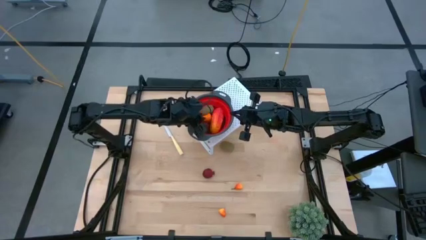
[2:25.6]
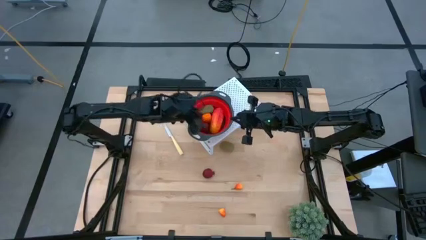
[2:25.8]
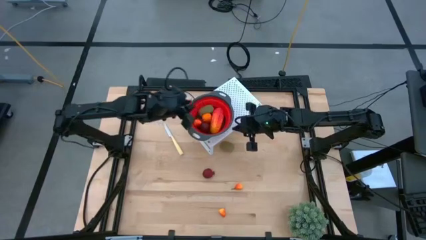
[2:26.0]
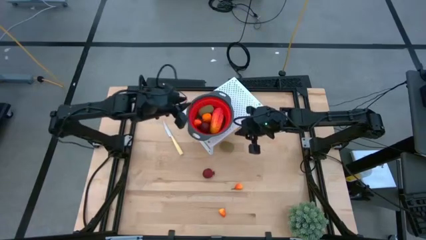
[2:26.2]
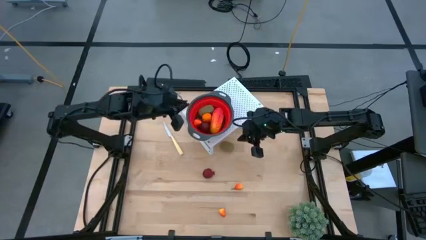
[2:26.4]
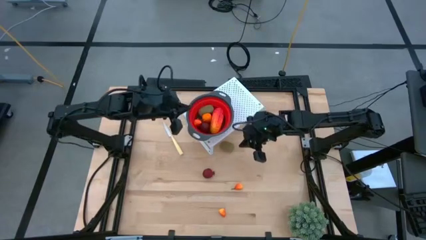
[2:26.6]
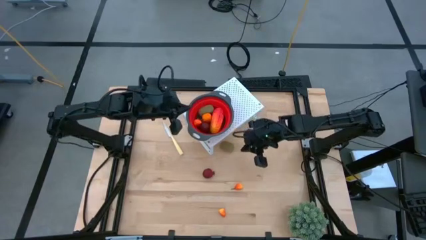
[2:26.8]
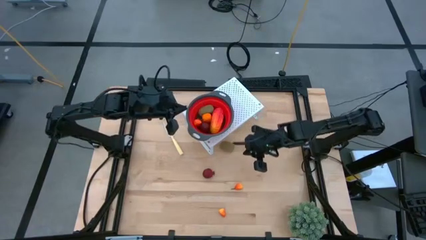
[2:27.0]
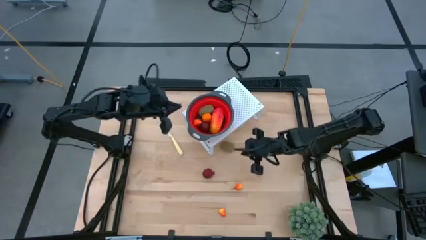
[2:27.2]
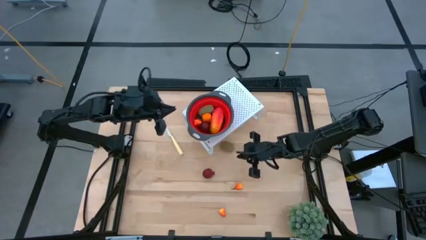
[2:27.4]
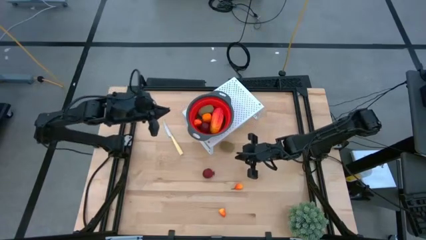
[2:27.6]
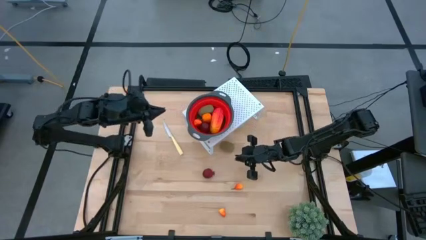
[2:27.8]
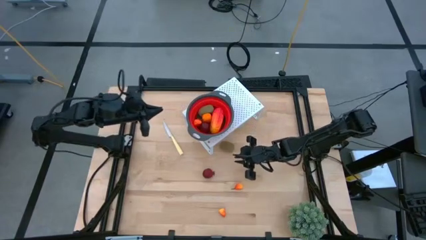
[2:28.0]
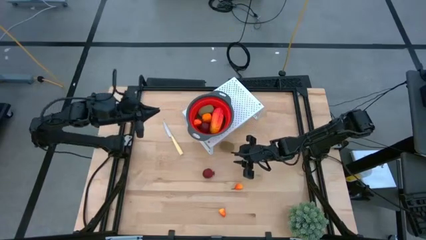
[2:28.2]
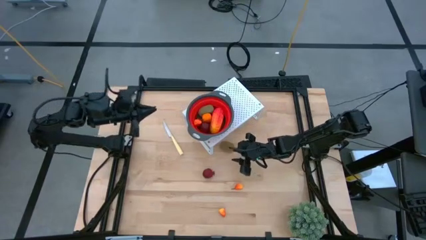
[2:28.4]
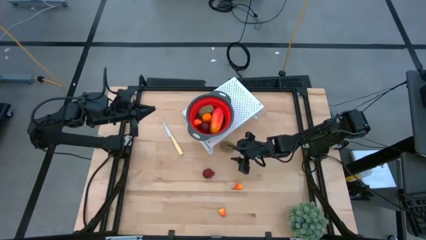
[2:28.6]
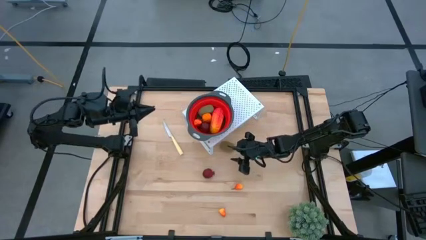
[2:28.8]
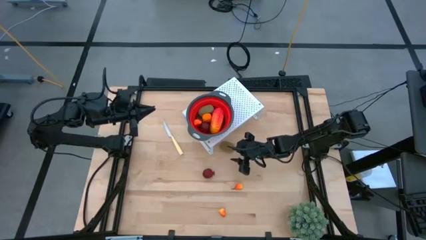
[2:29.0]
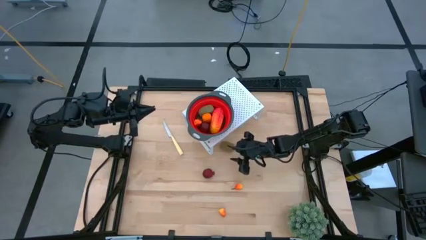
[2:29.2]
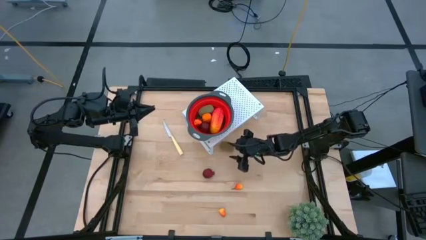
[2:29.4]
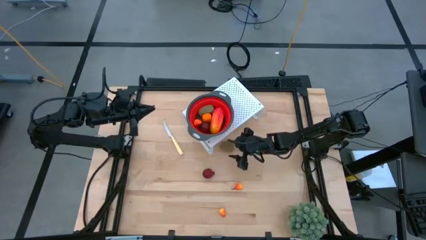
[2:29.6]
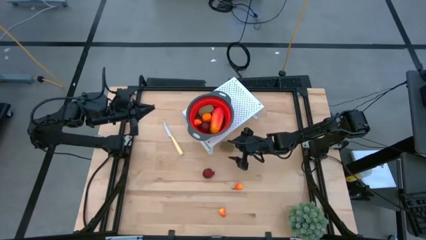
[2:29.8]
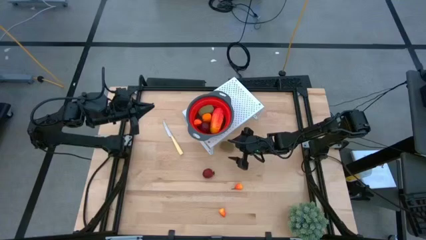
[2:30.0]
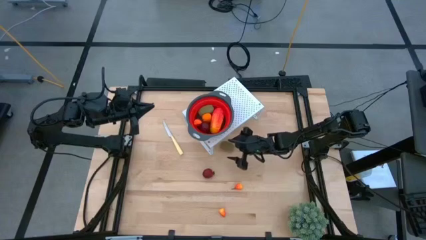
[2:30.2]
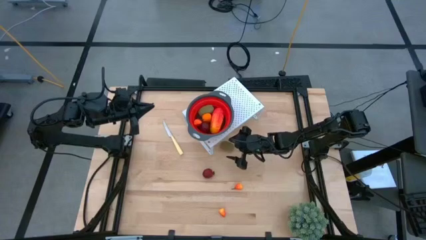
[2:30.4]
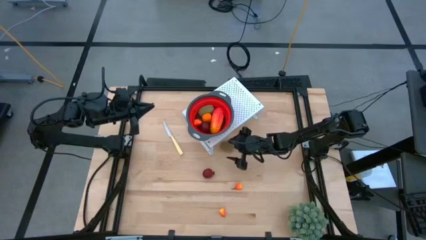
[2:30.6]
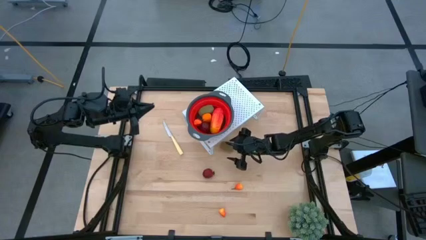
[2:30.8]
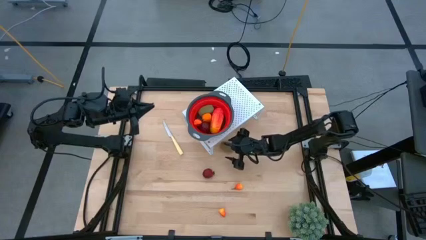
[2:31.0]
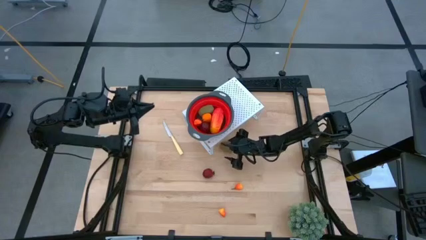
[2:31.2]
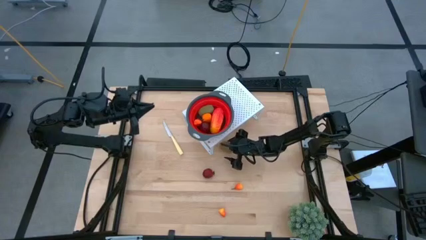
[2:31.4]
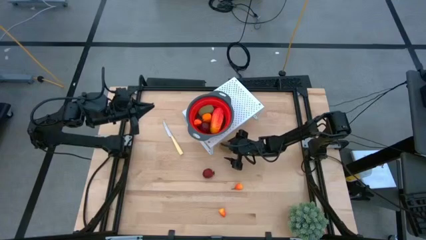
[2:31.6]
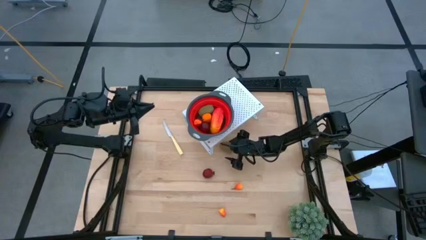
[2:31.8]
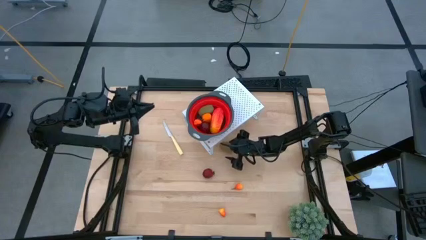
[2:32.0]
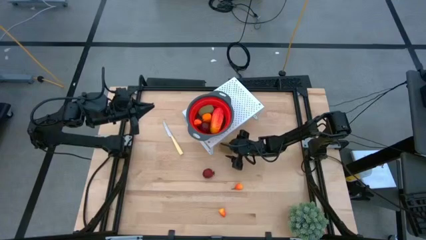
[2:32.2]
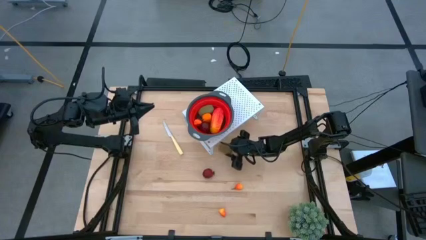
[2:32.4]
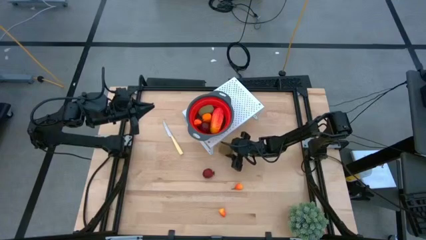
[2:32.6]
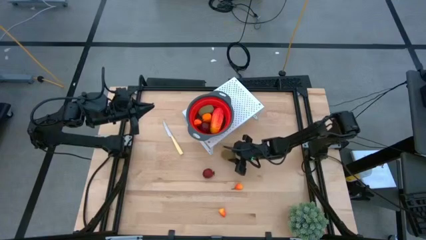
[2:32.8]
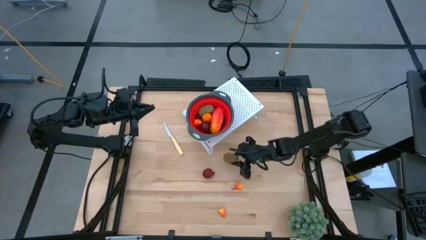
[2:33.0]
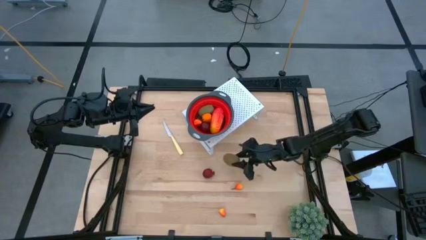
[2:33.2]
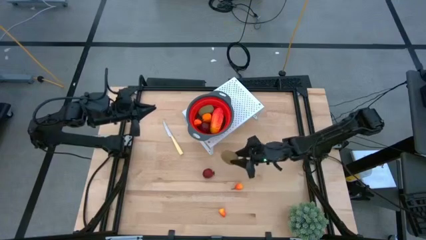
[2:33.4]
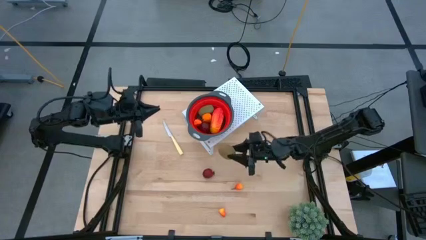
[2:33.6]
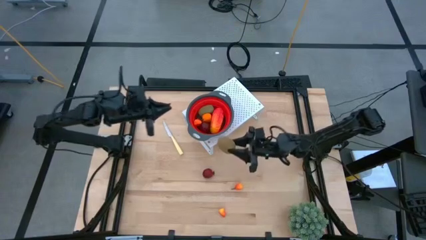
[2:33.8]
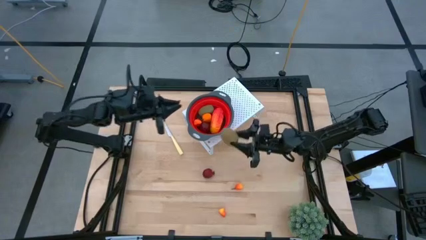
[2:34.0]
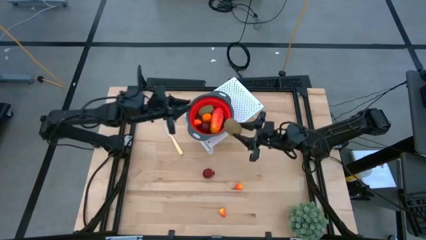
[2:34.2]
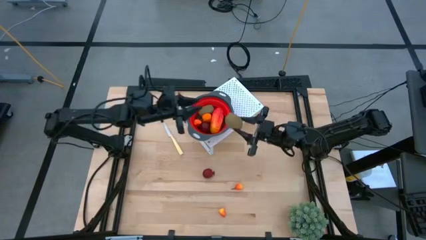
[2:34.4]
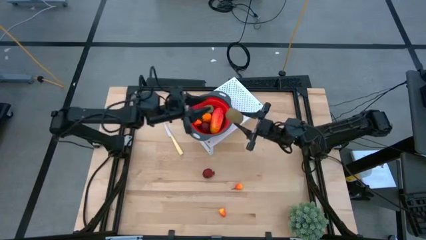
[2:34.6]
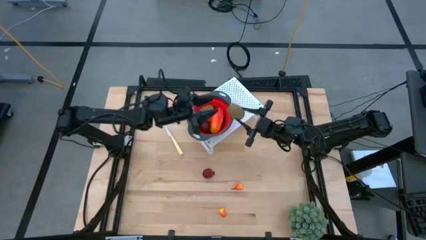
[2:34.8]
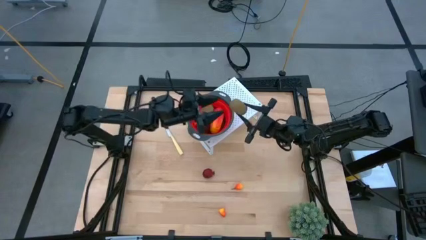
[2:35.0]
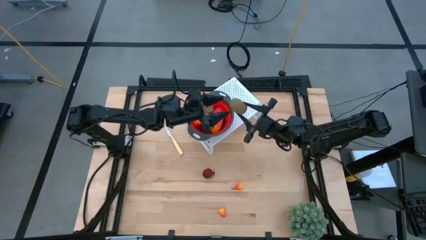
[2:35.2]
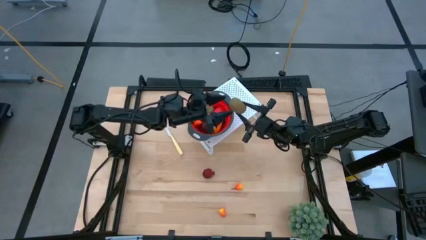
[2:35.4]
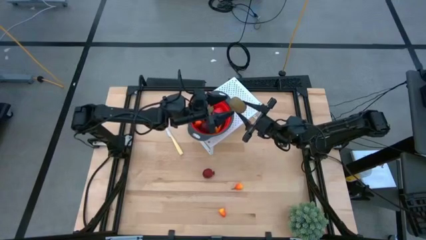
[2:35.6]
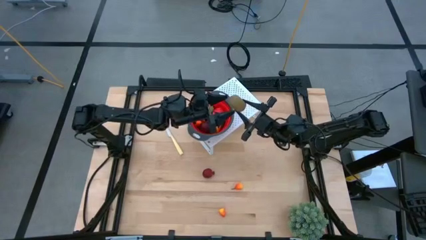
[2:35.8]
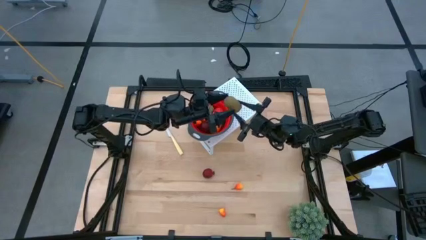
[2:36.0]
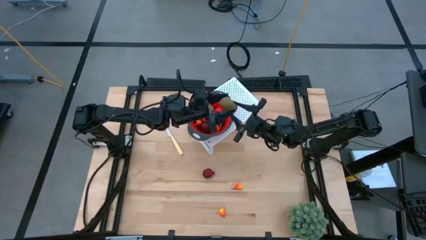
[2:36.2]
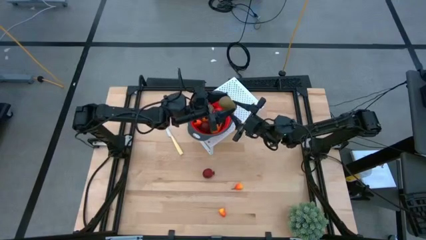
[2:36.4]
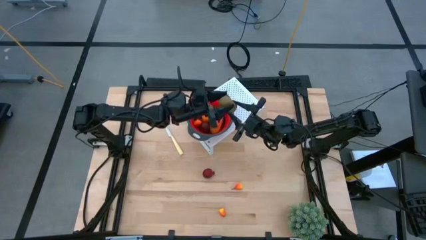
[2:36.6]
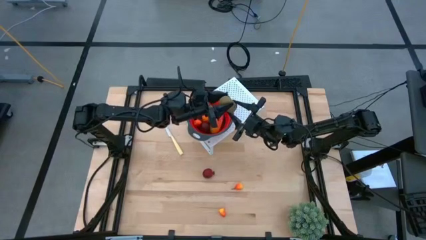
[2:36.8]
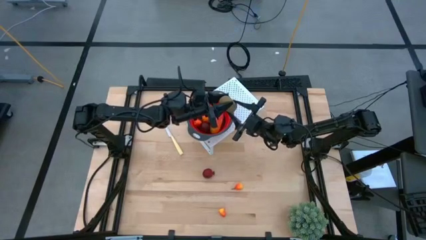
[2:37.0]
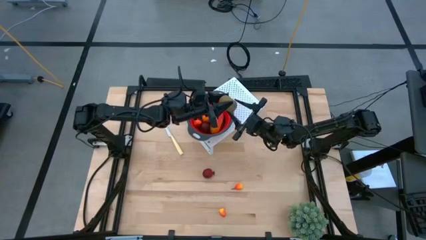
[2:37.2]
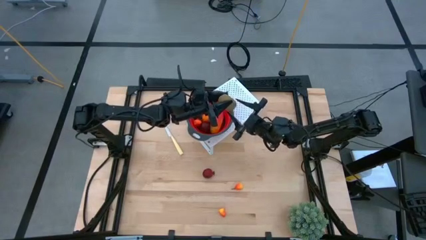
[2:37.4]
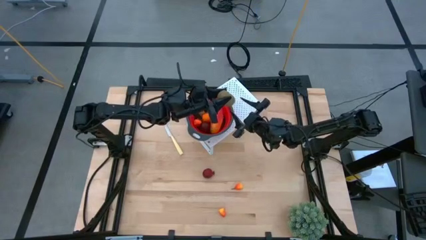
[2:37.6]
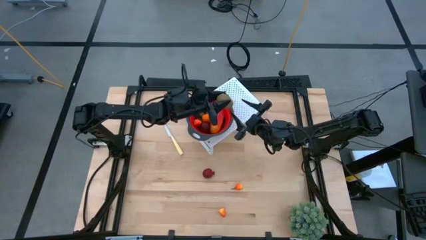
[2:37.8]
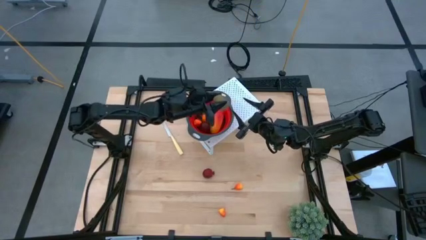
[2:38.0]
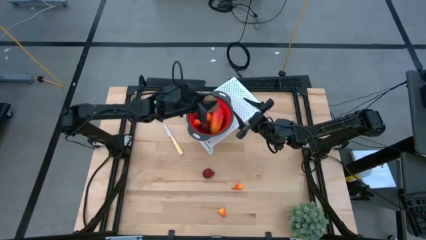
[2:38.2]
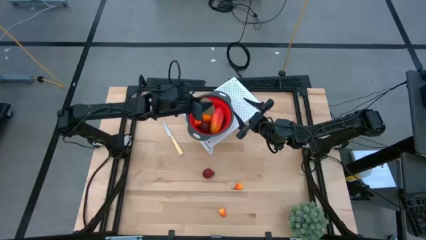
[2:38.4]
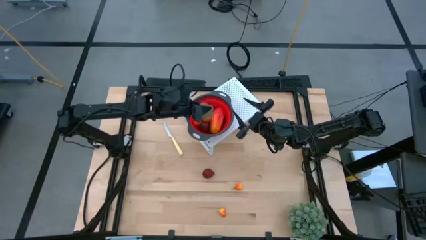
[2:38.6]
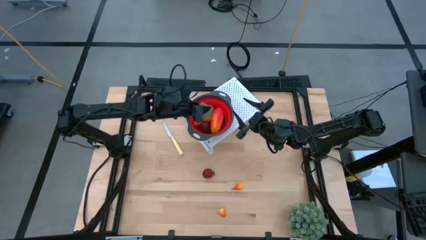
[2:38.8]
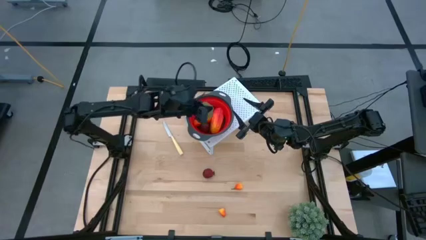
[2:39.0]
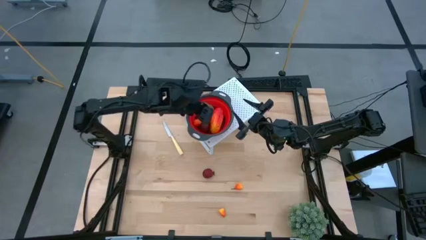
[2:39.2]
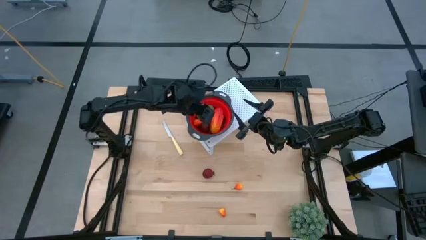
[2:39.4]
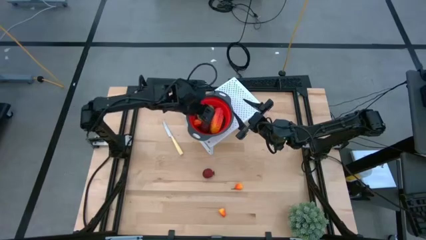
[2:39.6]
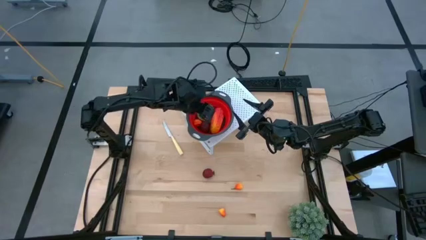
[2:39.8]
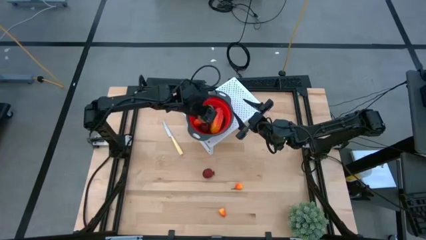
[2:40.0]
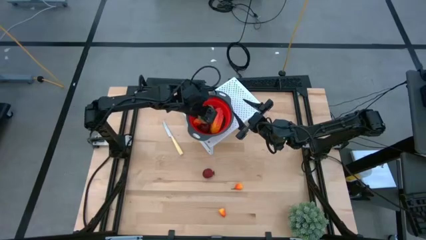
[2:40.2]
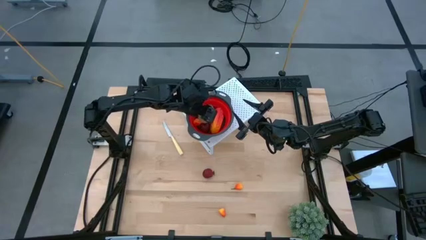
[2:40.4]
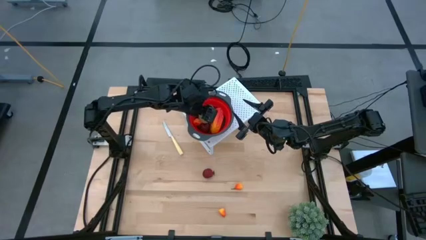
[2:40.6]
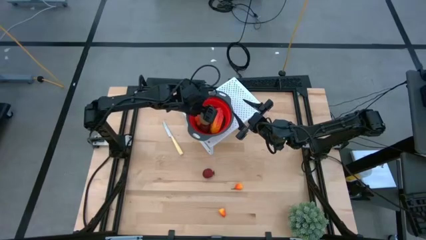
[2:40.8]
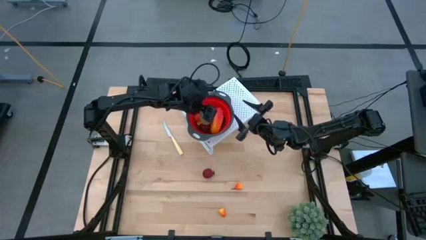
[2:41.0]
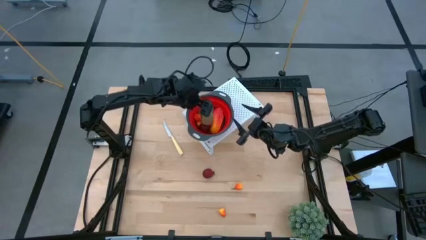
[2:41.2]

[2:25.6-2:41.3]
Task: Pick & Place Fruit
Put the kiwi into the red strainer bowl on the shelf
